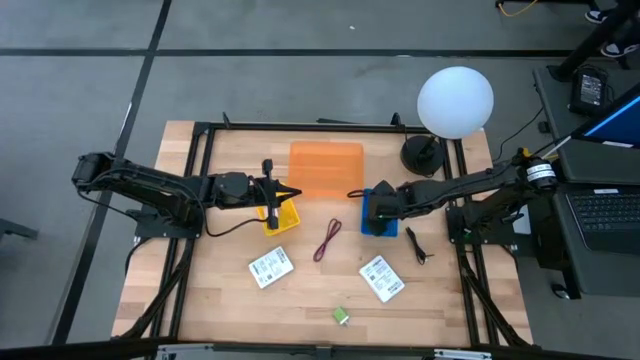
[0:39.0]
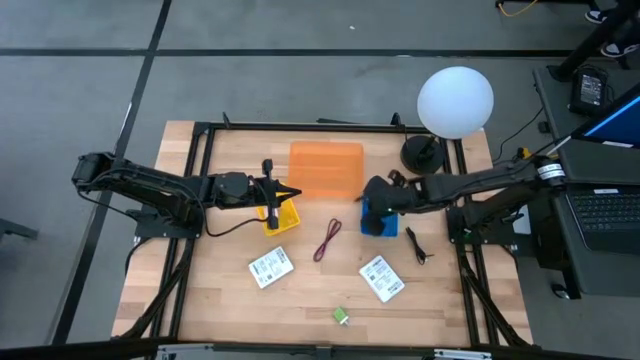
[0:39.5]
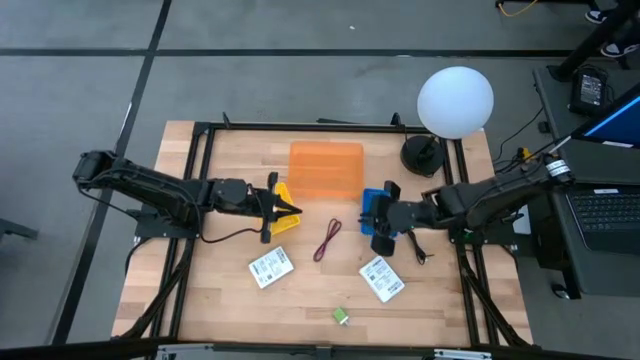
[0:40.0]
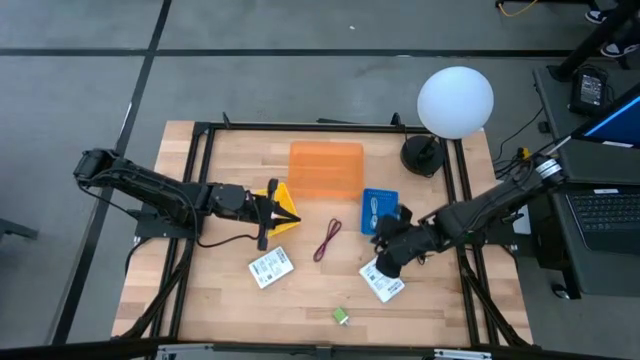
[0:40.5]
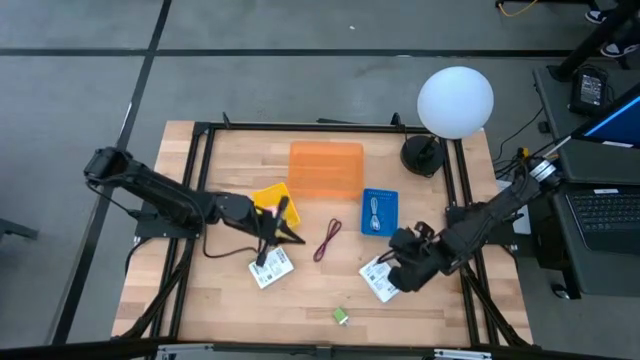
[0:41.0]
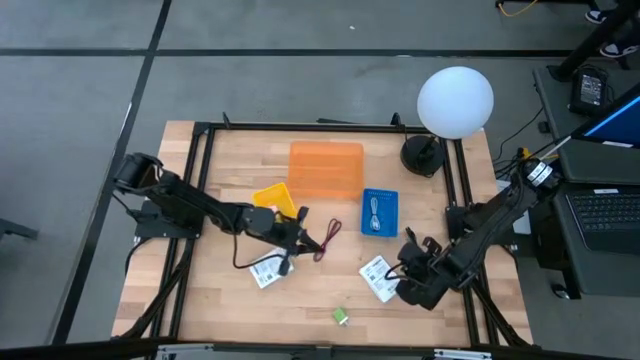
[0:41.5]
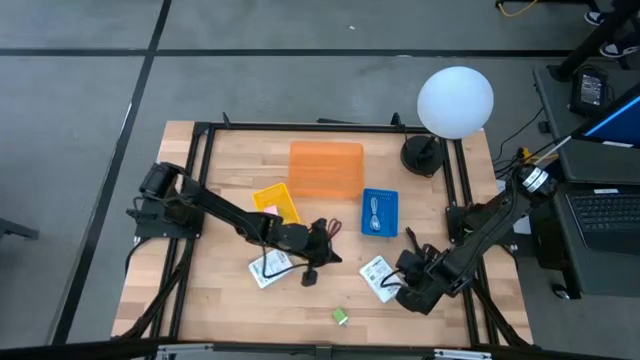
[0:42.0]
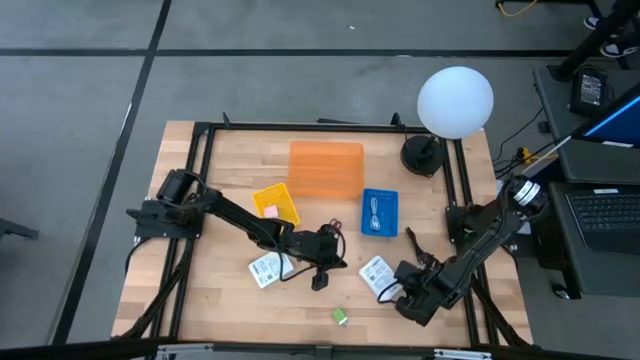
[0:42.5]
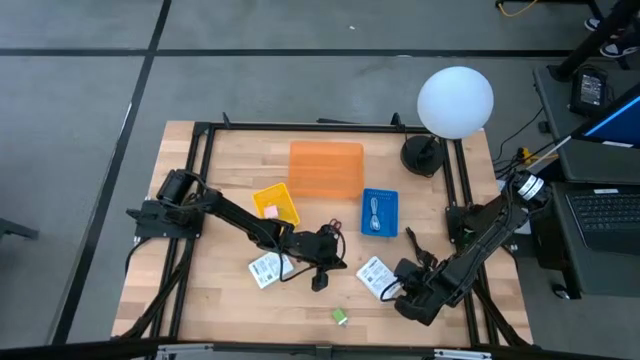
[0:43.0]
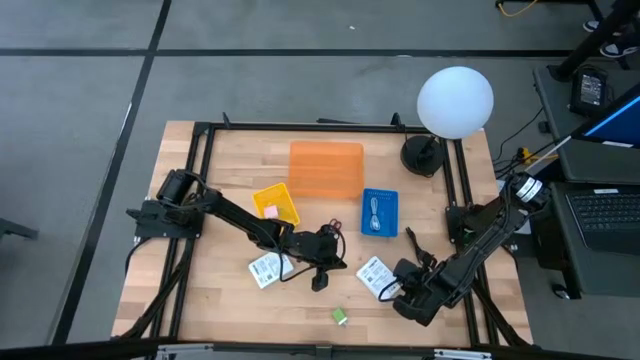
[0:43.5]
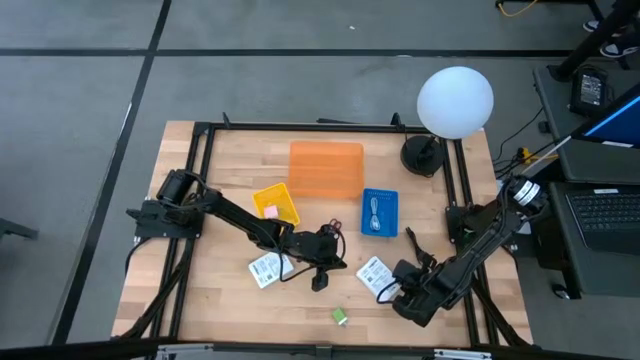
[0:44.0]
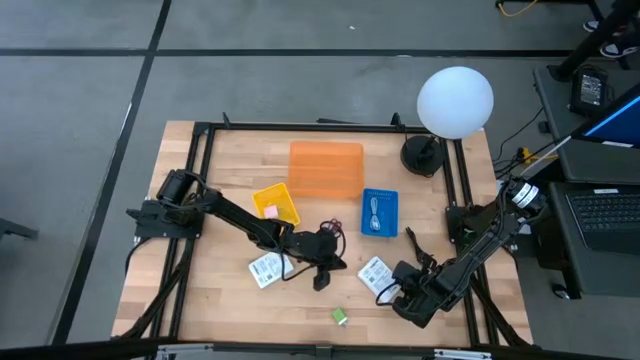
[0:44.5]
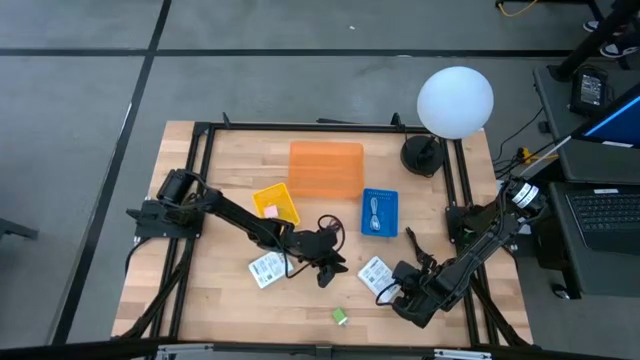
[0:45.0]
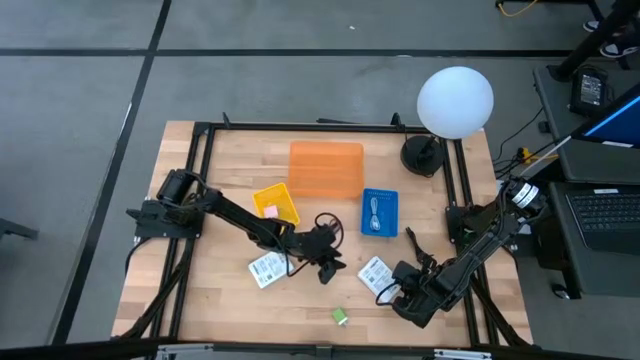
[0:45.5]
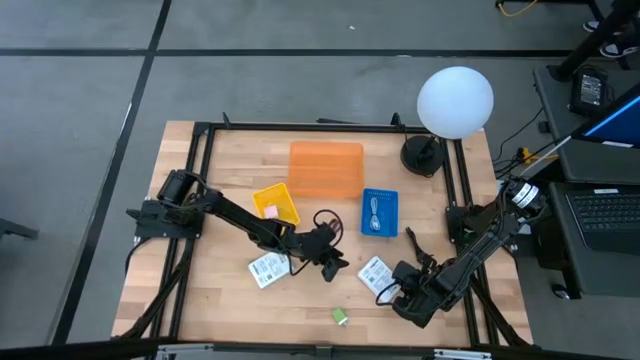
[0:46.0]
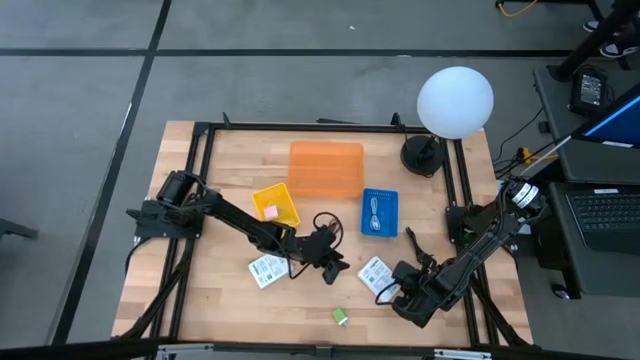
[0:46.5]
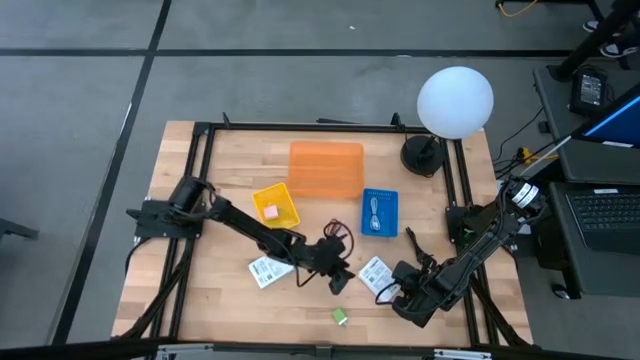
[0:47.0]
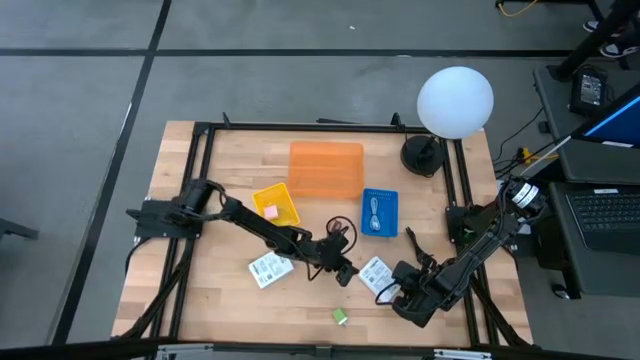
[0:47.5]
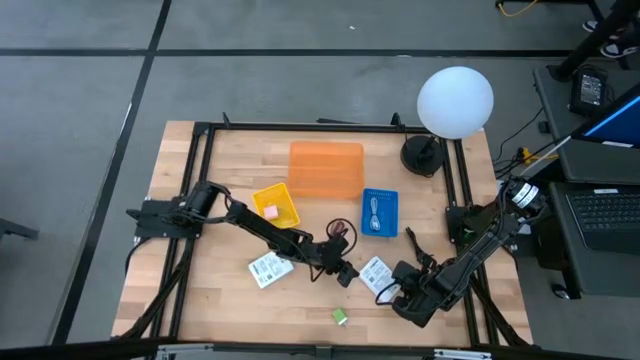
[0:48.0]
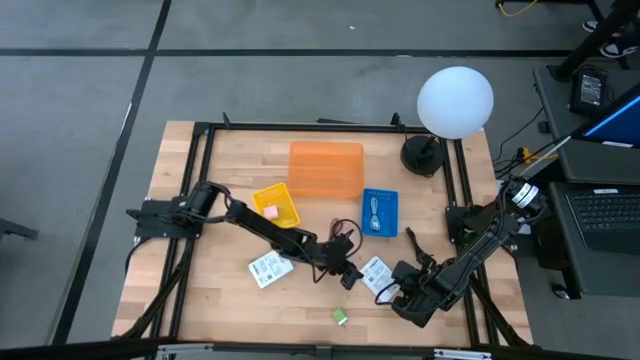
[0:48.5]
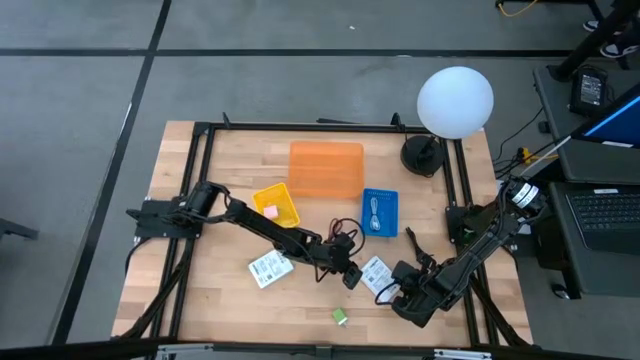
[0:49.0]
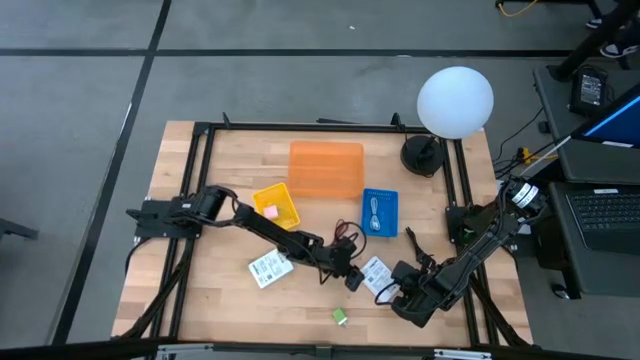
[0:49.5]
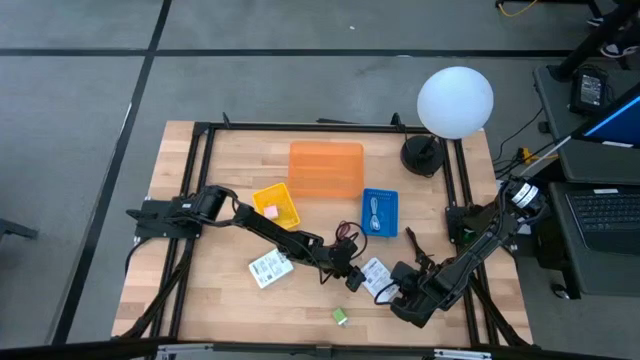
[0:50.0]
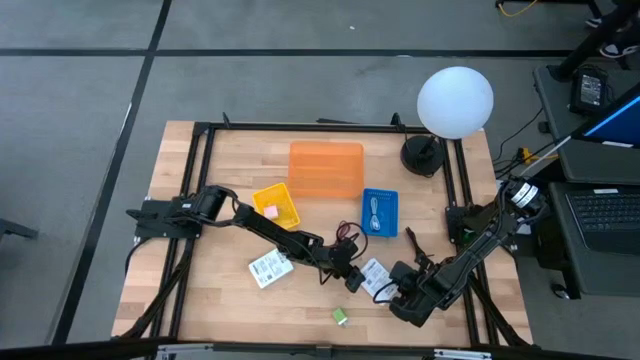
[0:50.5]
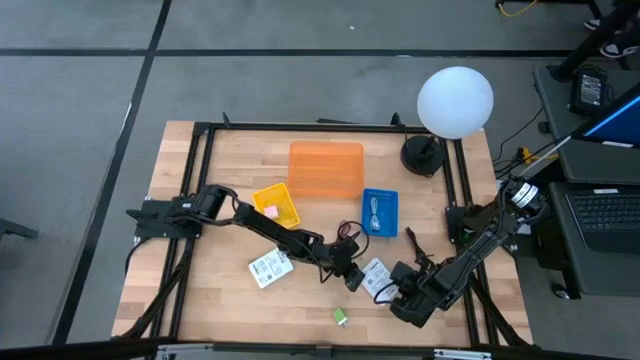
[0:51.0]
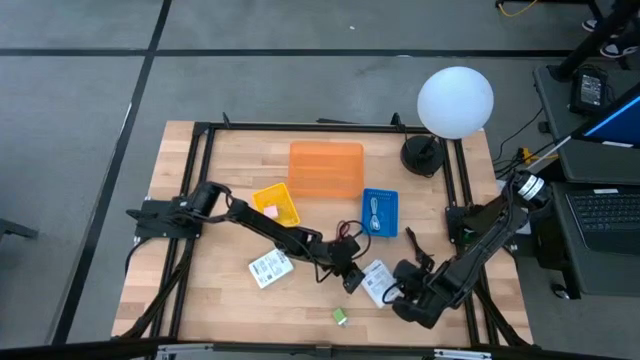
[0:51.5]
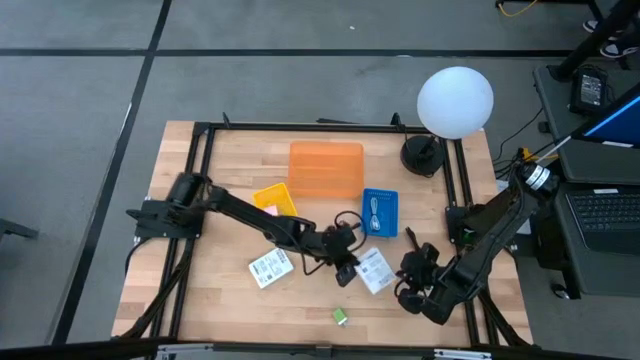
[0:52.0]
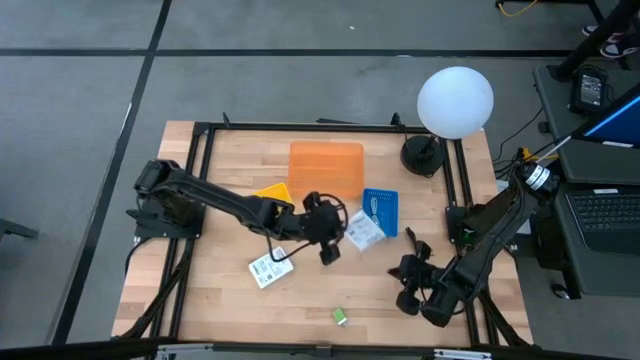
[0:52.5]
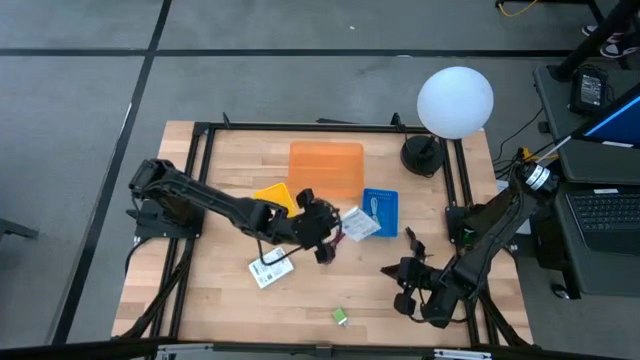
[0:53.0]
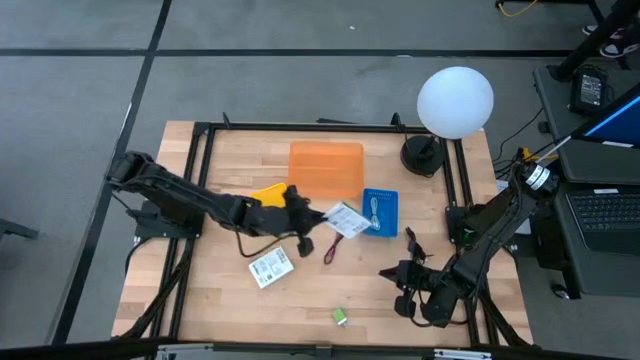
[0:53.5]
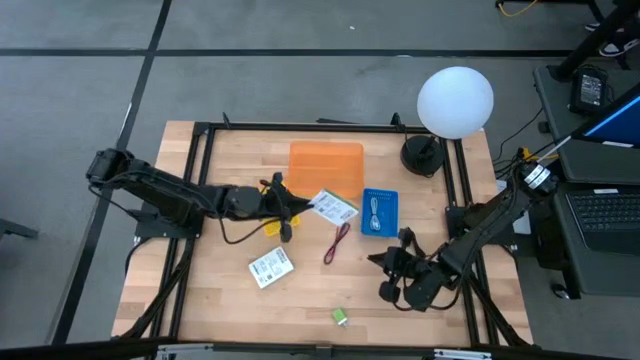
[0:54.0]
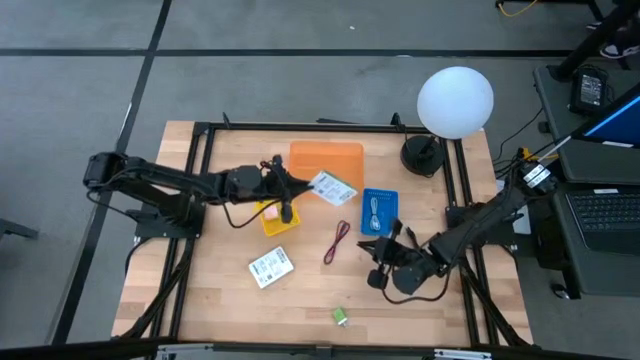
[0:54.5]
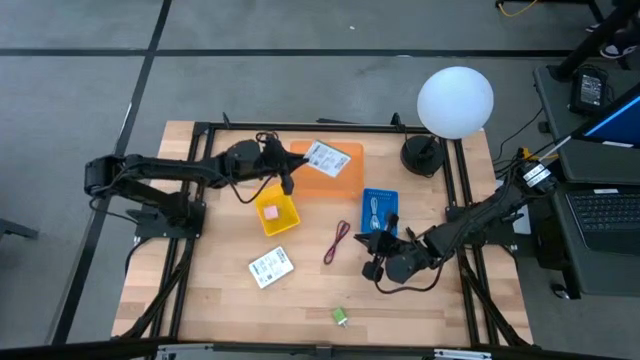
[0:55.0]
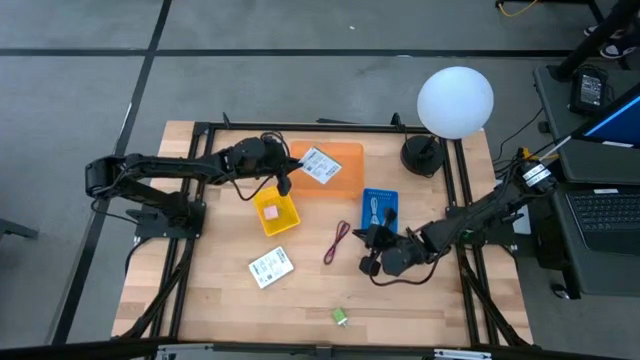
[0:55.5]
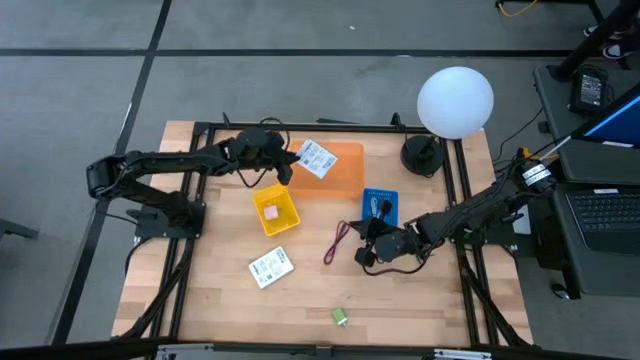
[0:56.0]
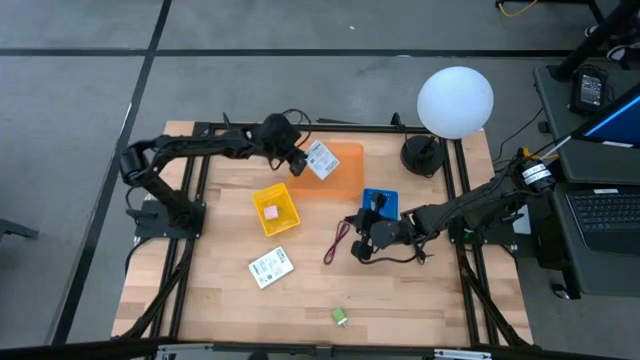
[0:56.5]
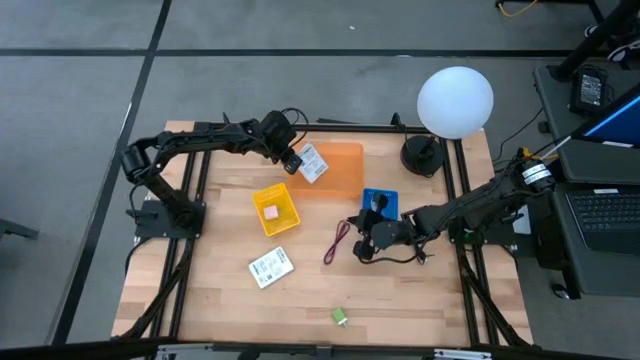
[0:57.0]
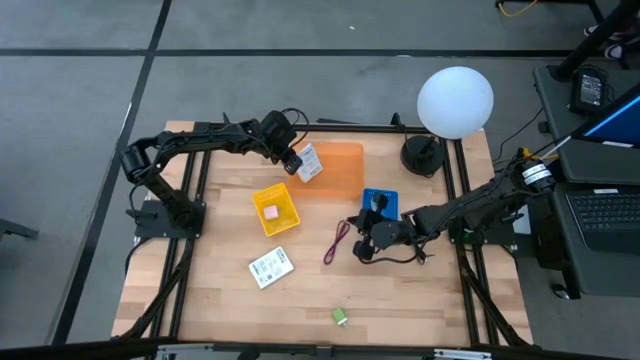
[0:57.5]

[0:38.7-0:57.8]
Task: Pick and place items into bin
Put the right card reader box into the orange bin

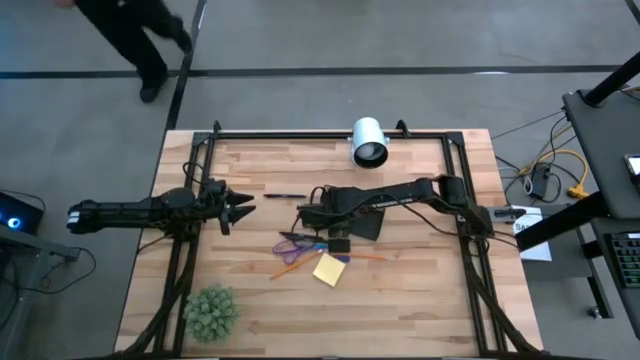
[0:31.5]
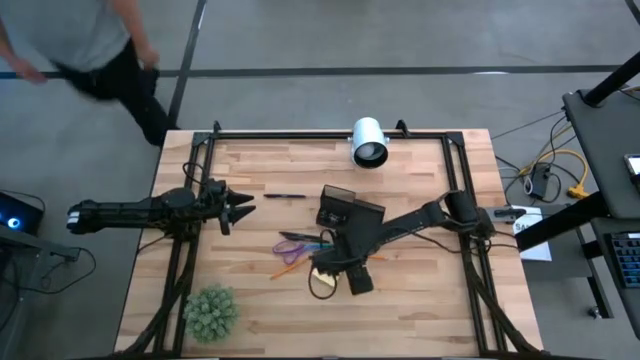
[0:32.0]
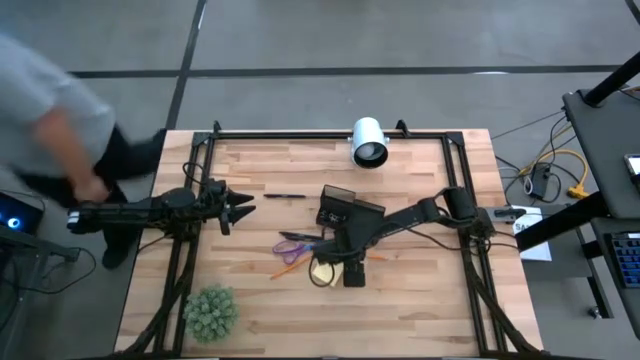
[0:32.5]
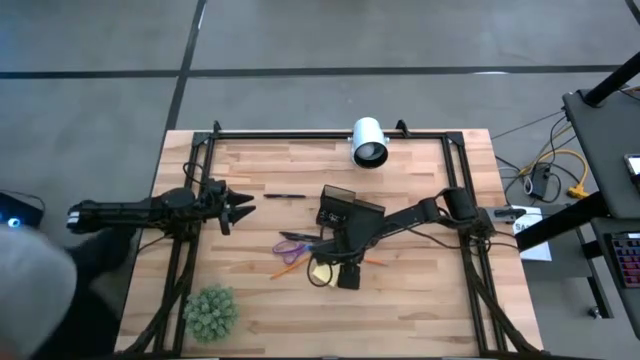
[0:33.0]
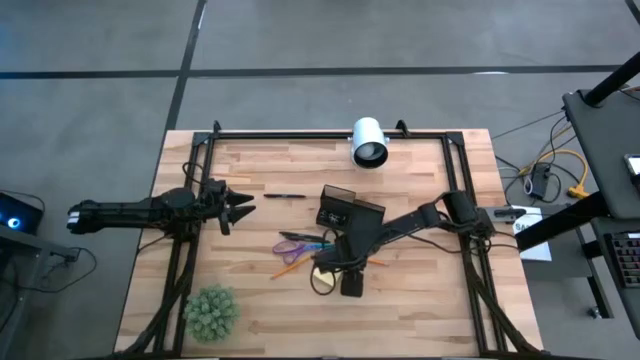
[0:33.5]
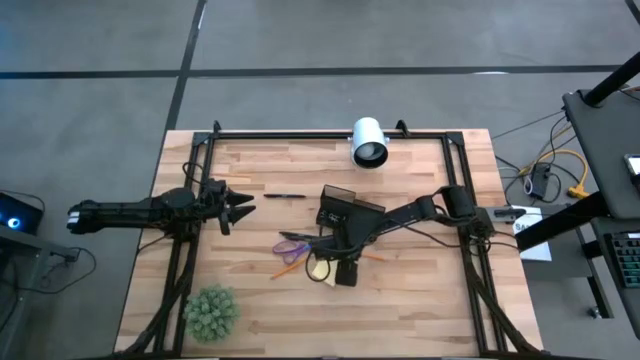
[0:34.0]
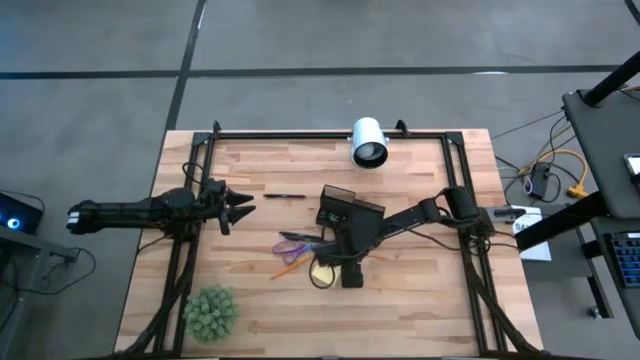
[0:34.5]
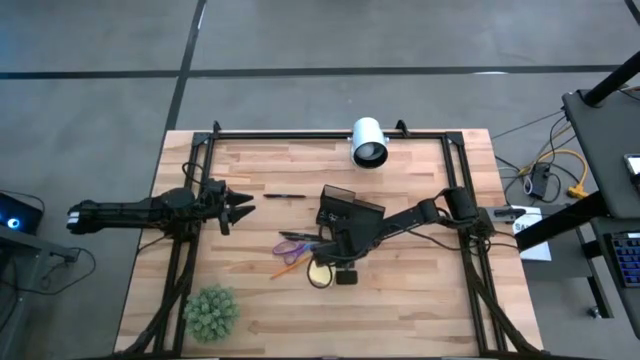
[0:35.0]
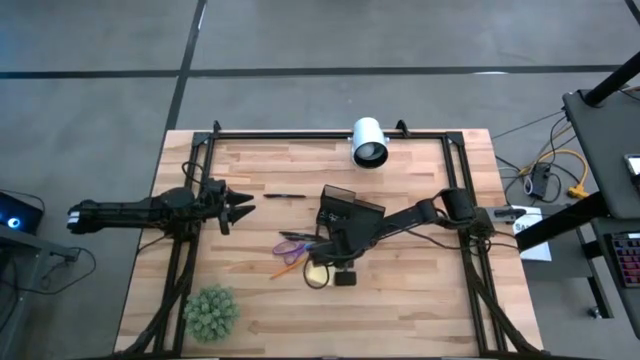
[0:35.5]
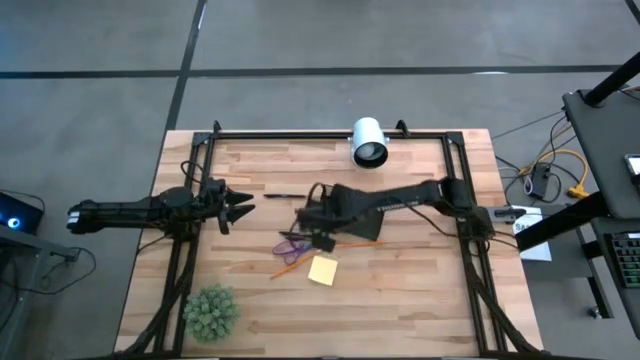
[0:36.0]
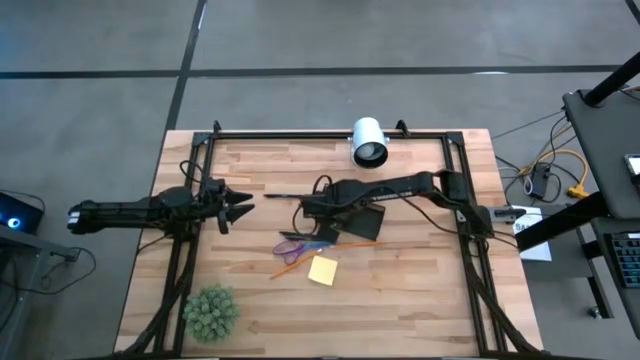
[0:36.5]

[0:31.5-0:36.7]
Task: Pick and place office supplies into organizer
Put the blue eraser into the black mesh organizer
